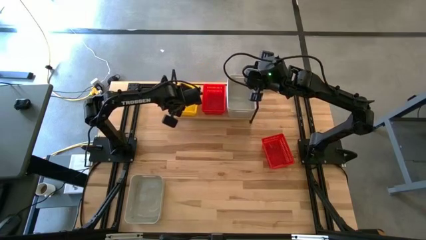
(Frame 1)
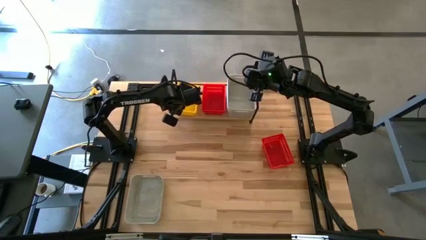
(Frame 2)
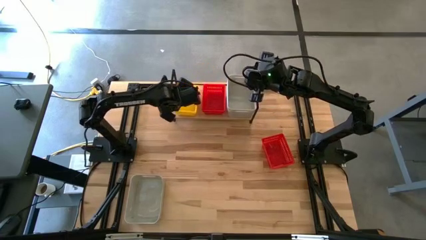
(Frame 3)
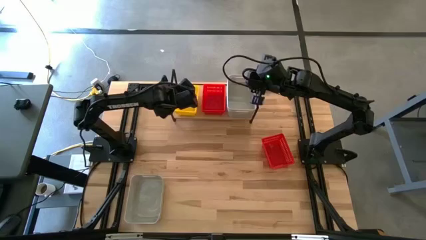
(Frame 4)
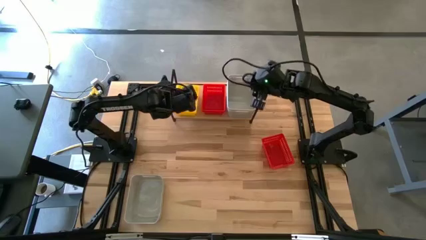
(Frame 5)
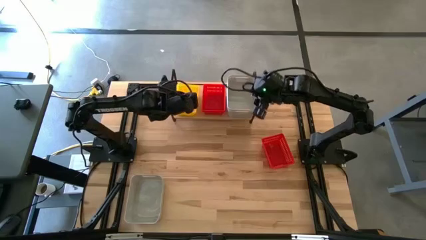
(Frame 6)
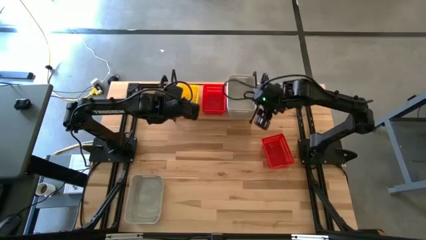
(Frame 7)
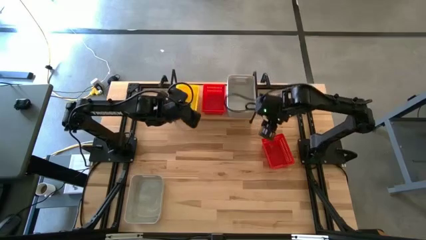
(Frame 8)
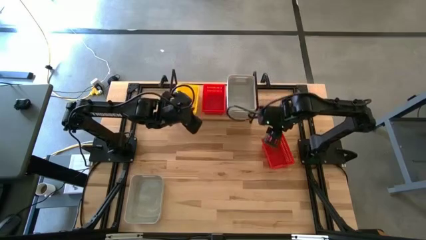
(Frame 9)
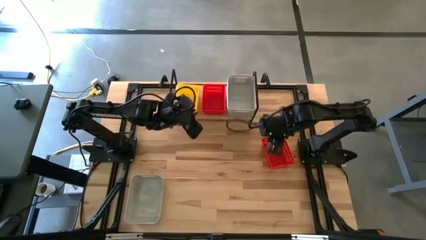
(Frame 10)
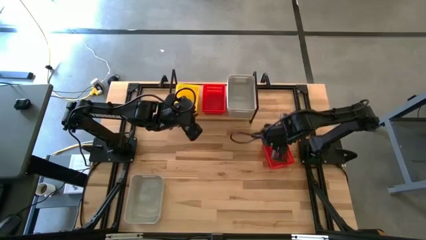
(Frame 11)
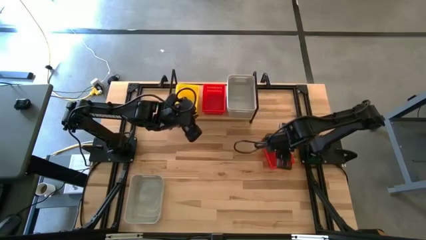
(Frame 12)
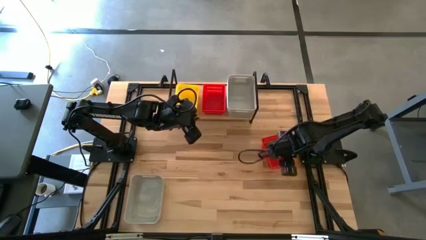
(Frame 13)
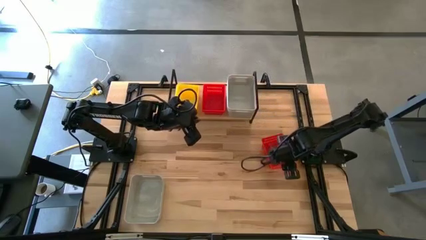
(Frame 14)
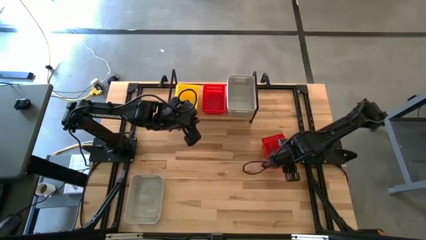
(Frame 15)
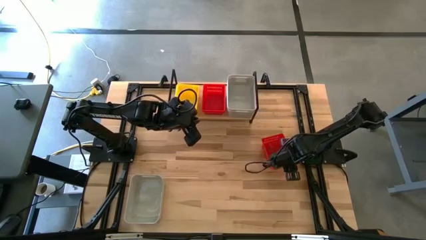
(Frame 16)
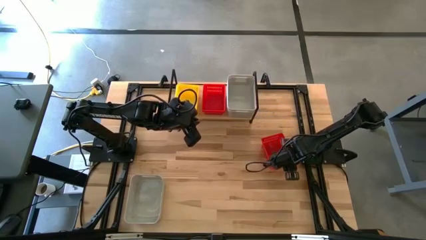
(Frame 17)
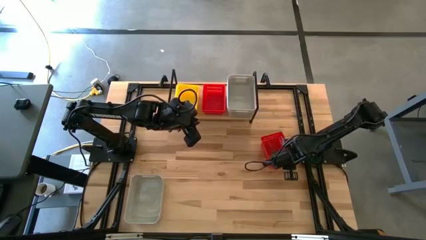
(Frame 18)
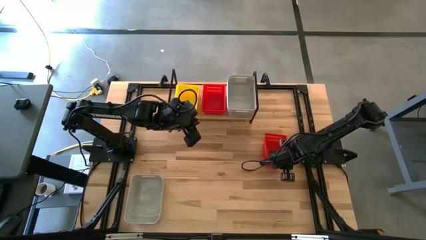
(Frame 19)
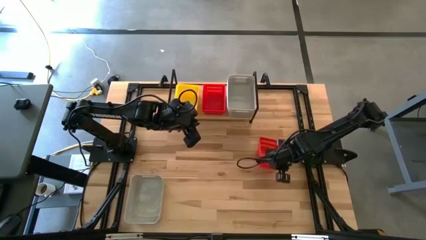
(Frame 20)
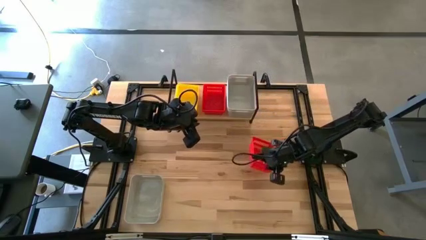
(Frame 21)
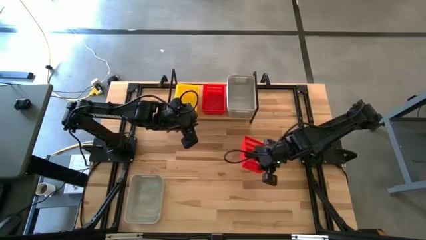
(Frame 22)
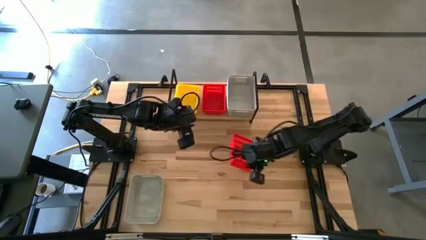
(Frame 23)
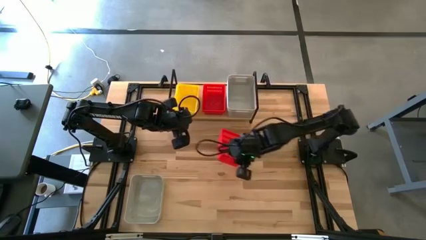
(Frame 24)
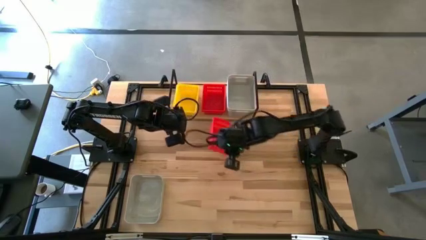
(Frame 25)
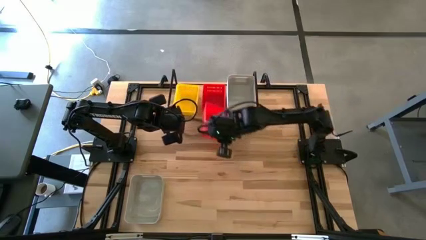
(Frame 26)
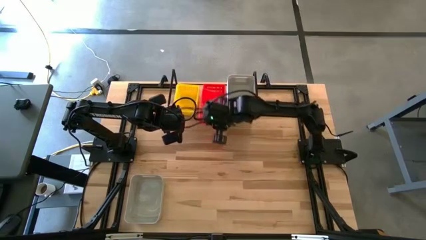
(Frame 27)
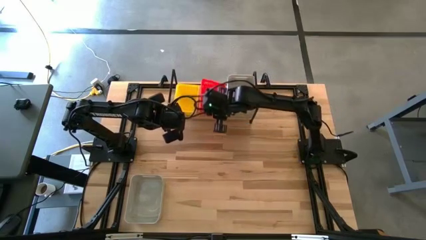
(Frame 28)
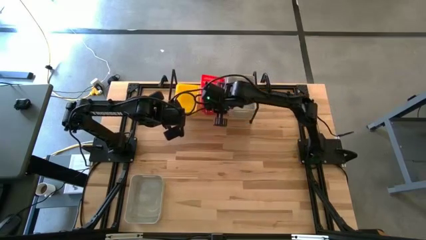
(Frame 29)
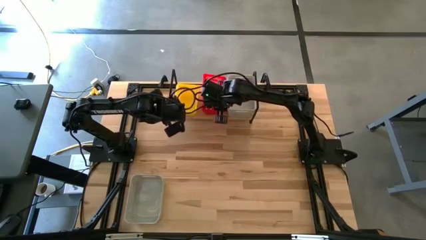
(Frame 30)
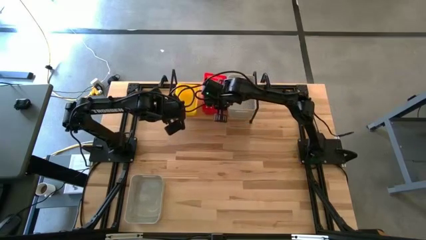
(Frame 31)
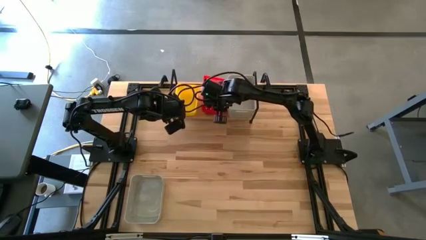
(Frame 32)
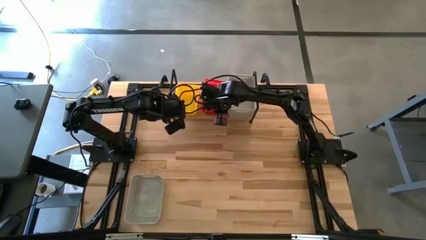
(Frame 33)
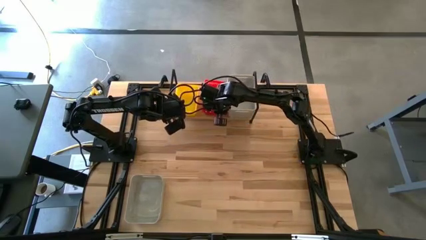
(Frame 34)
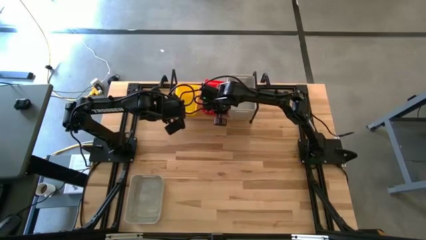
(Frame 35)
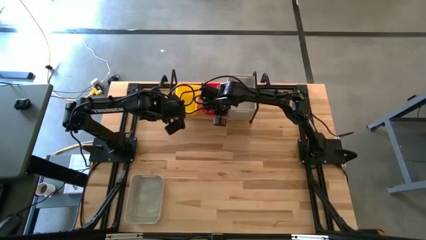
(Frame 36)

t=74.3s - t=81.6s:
Task: Stack baskets on shelf by color
Stack the red basket on top of the red baskets on the shelf

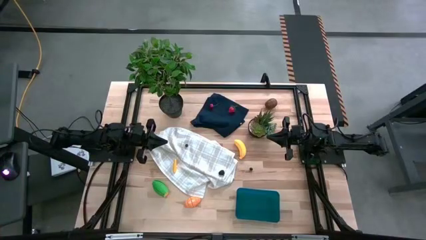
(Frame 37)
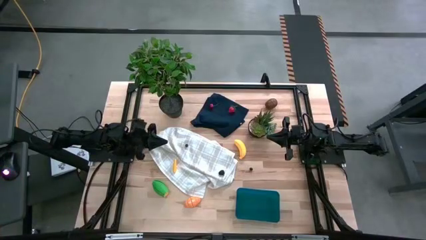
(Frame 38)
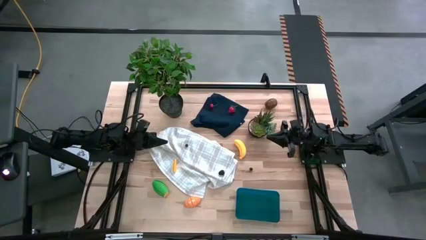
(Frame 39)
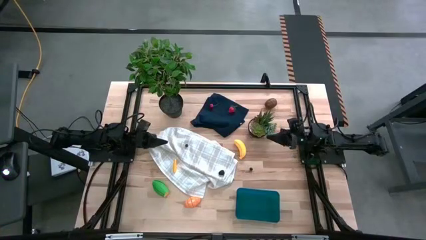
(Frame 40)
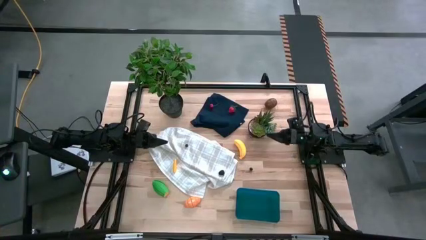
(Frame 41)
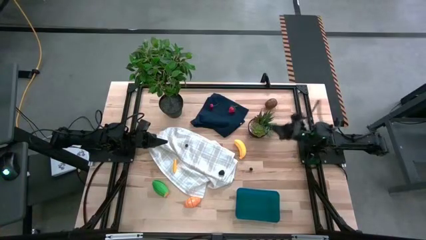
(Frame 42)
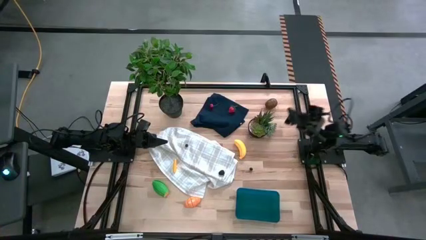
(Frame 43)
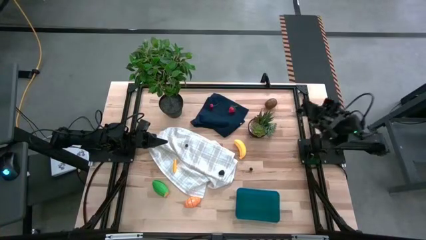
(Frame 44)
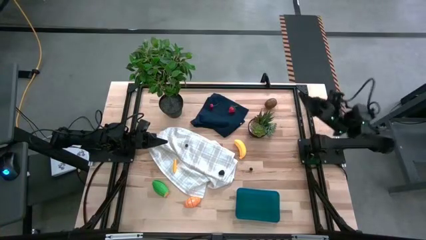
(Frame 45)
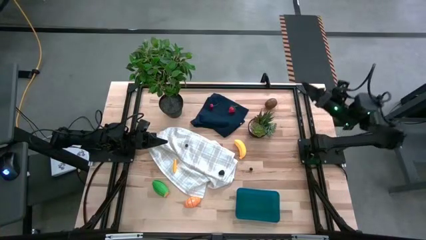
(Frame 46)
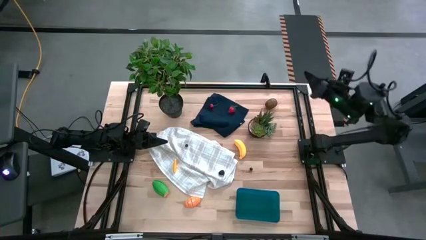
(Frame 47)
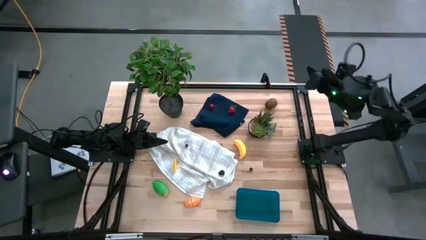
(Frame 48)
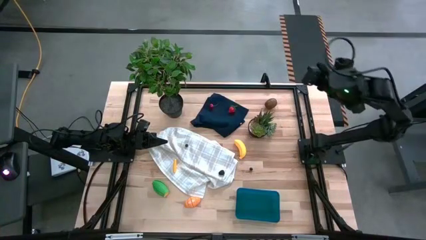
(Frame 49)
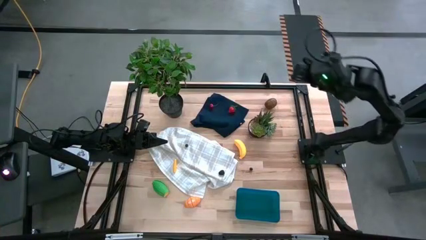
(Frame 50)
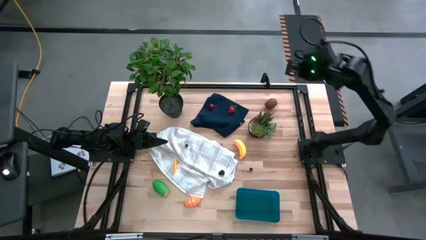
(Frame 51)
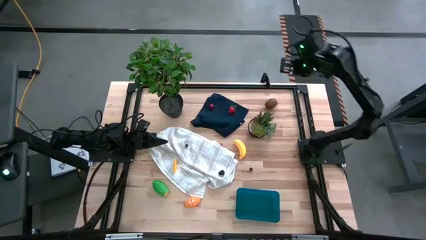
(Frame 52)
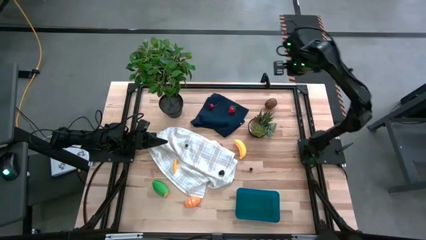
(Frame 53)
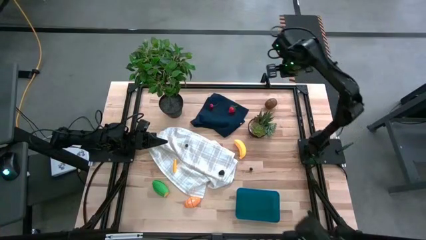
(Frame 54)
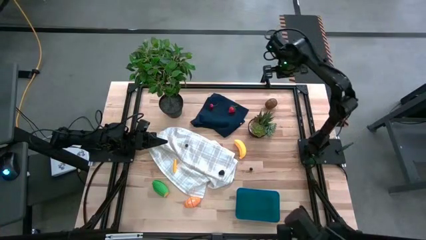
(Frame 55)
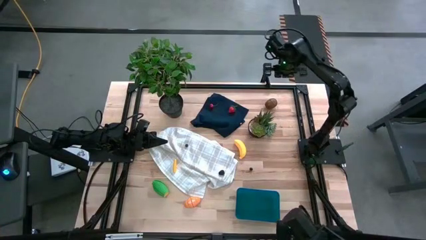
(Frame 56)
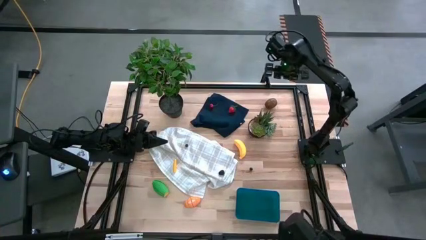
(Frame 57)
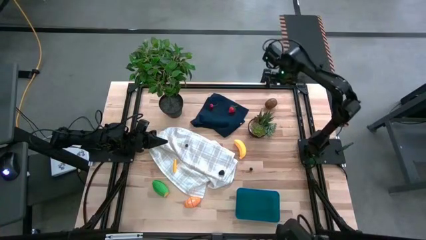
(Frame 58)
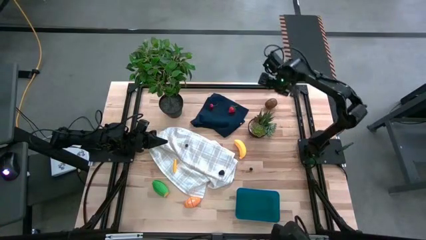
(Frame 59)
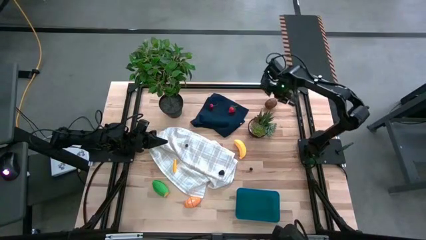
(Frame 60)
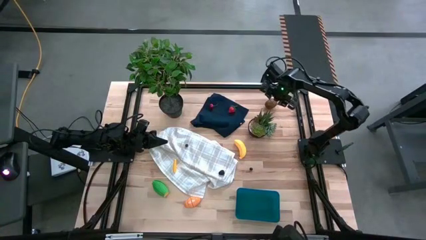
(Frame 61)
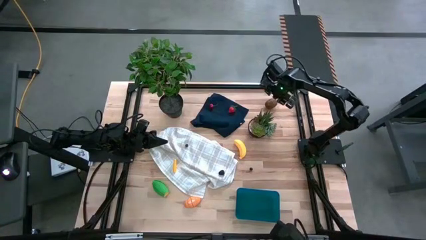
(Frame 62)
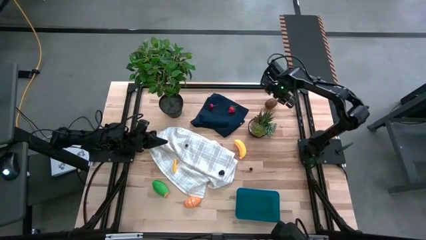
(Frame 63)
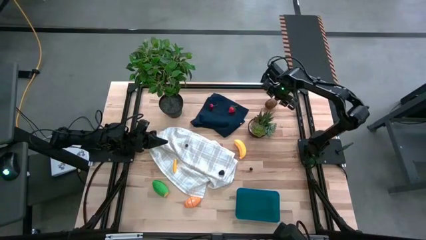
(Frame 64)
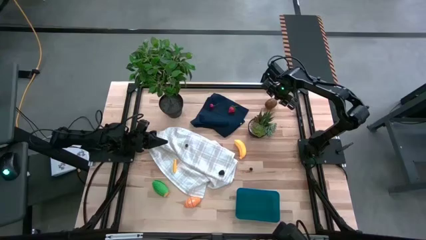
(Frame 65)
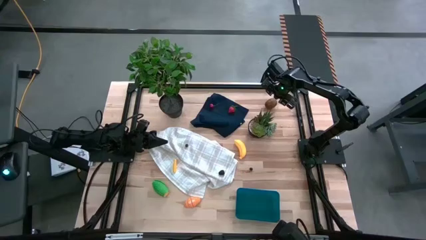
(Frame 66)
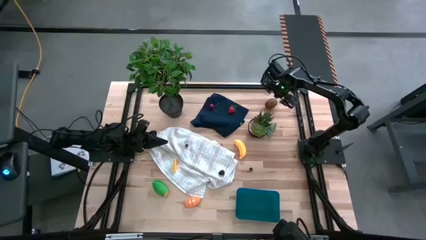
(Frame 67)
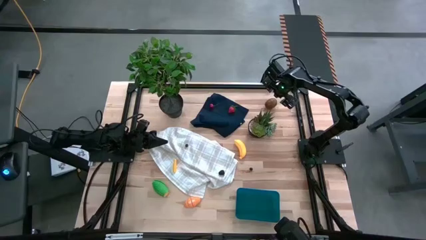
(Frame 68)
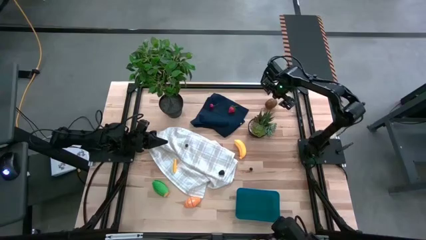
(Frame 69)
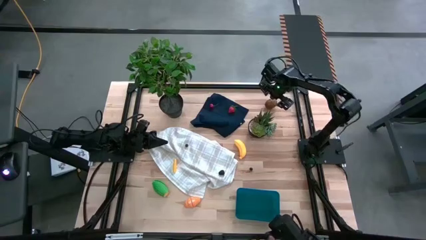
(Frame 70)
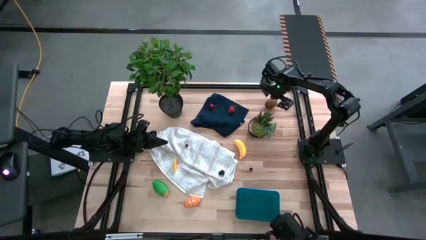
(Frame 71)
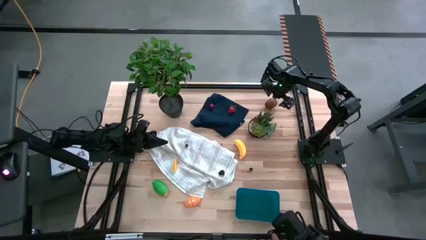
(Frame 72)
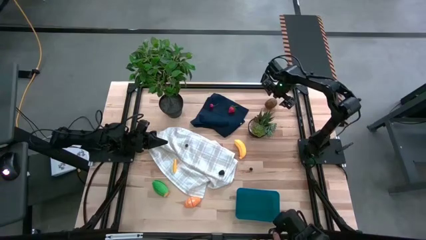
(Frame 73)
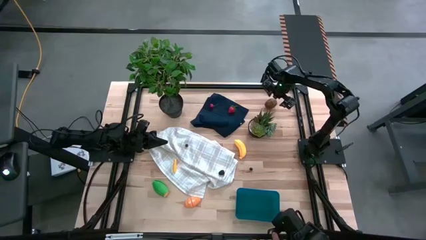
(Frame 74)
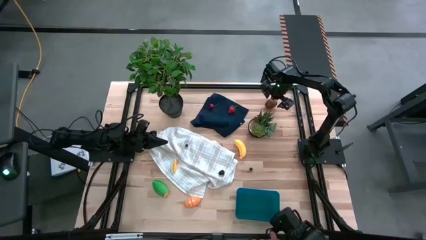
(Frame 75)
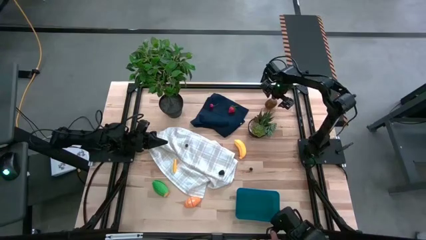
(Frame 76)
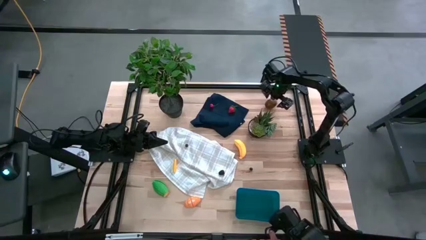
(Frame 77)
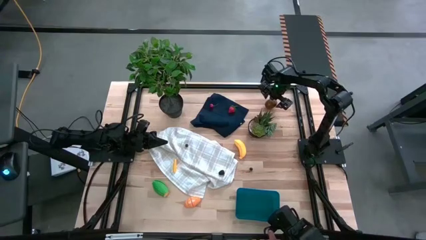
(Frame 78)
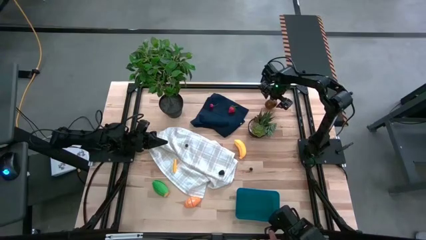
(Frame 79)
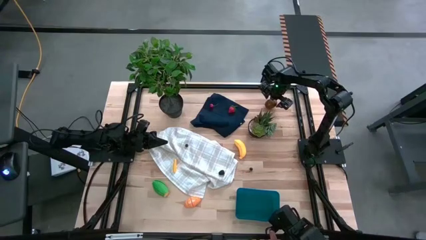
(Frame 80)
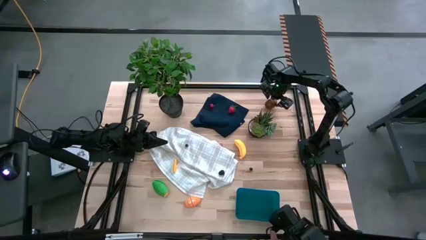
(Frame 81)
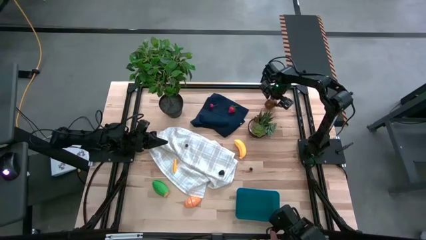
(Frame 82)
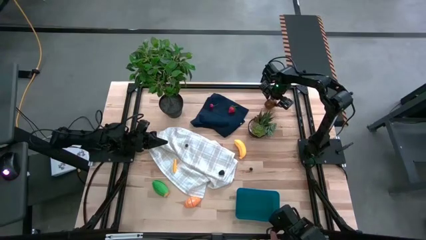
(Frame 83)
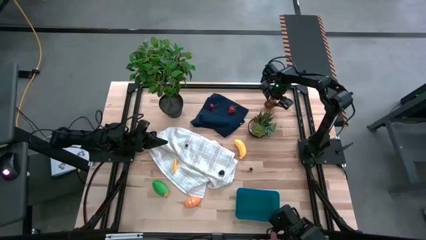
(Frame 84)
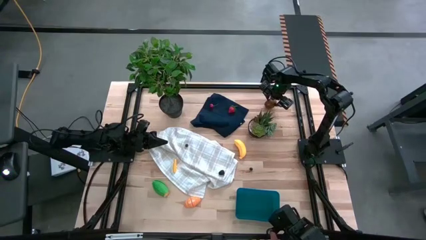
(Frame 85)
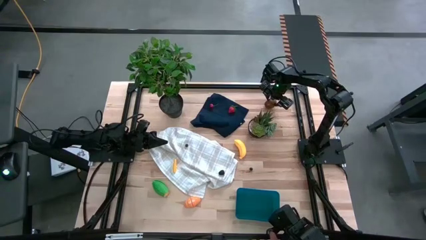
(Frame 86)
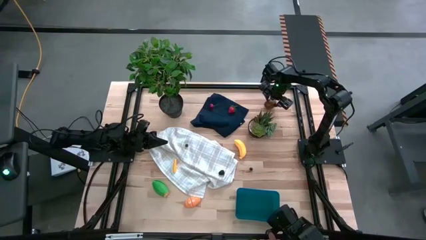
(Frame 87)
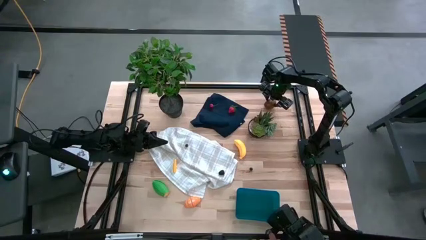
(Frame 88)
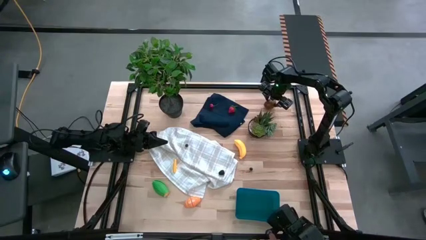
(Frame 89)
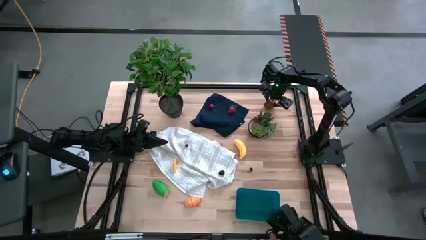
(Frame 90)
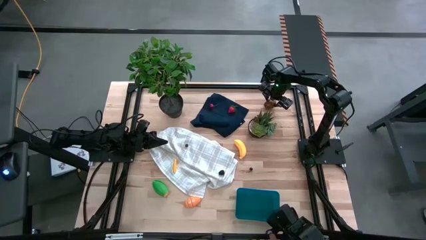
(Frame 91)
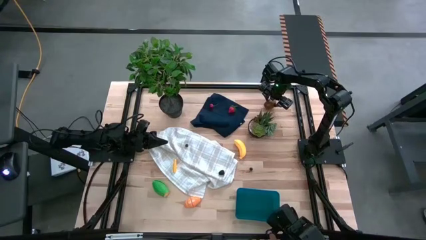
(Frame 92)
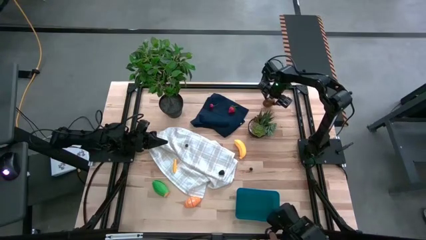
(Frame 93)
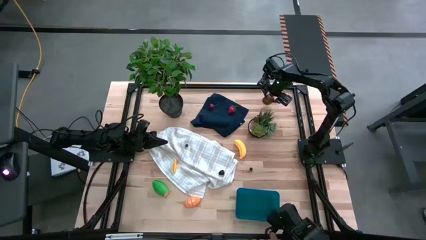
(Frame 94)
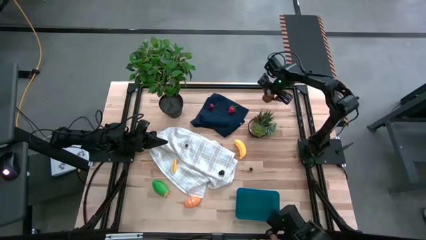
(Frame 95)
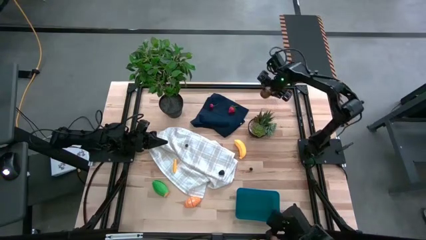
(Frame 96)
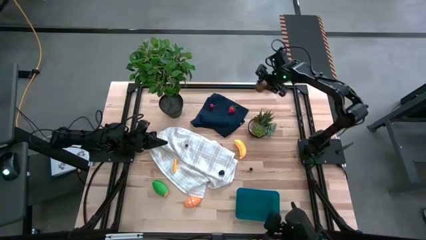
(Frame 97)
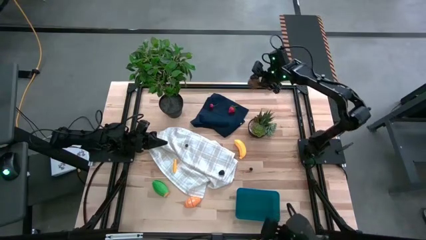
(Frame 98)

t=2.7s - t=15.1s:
Task: Pick and placing Produce into tupperware
Put the kiwi into the bin
